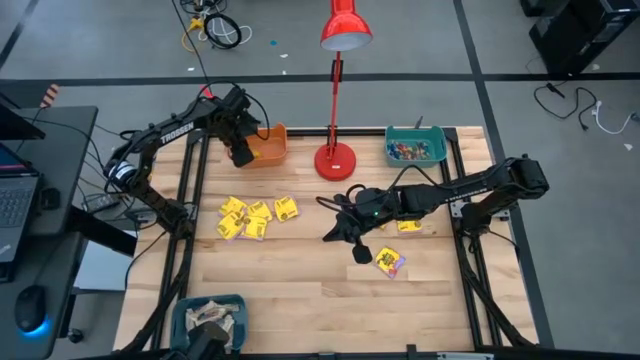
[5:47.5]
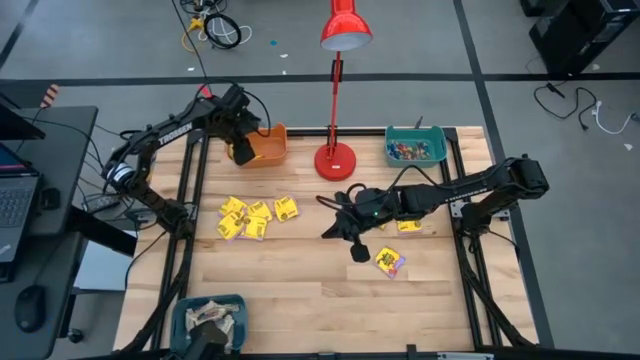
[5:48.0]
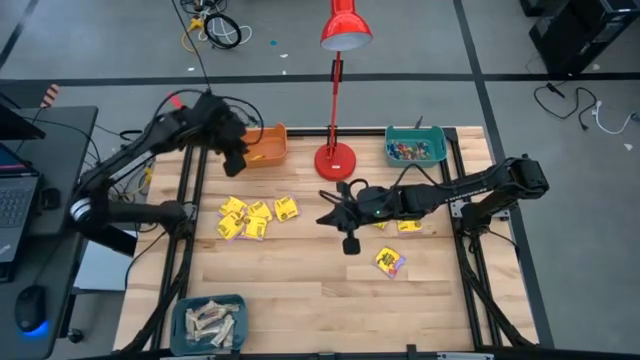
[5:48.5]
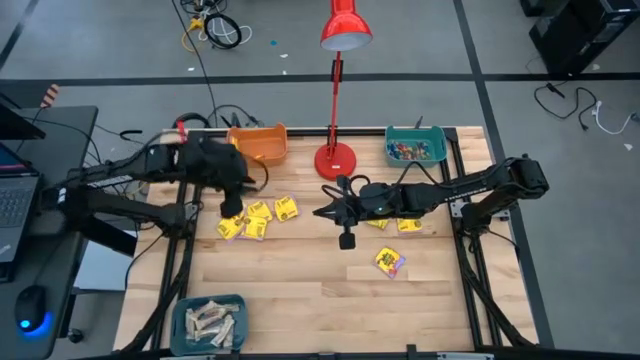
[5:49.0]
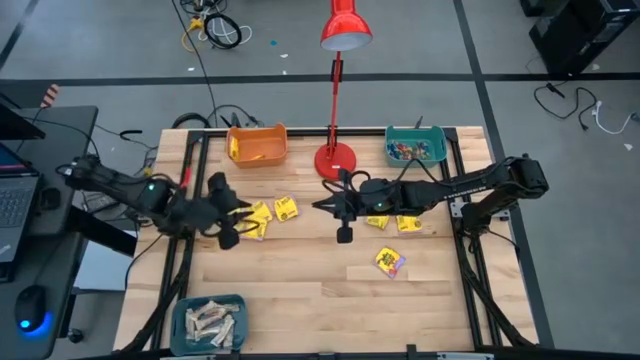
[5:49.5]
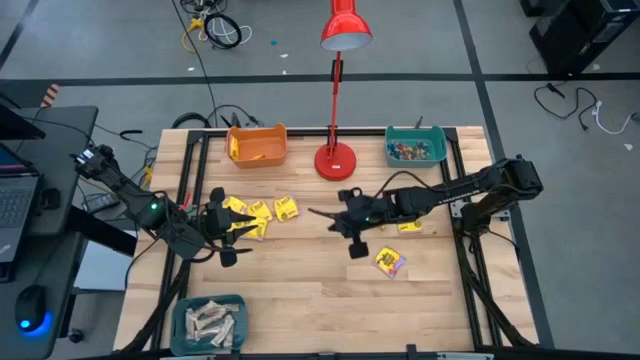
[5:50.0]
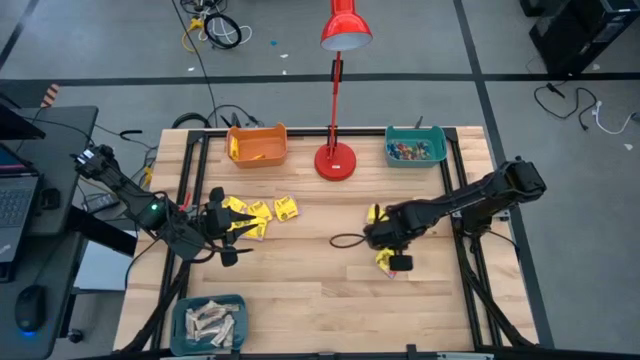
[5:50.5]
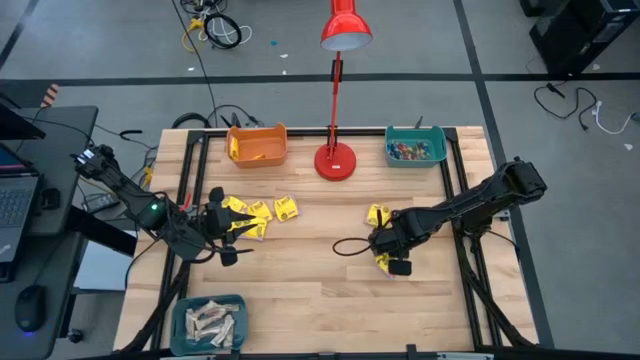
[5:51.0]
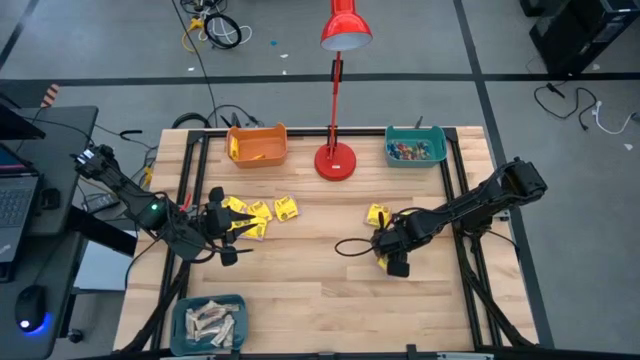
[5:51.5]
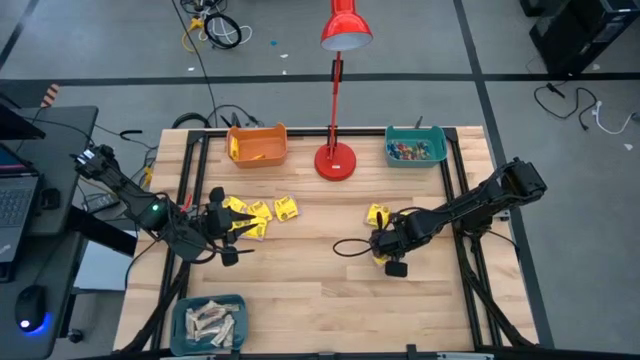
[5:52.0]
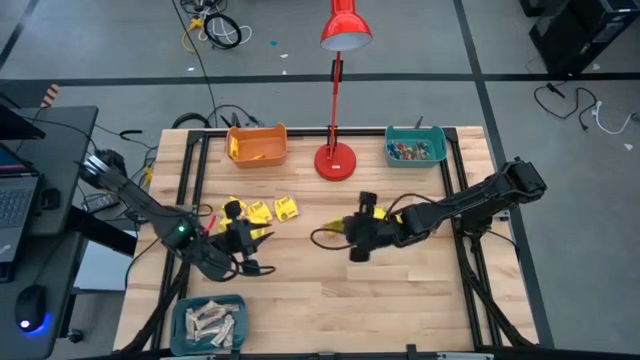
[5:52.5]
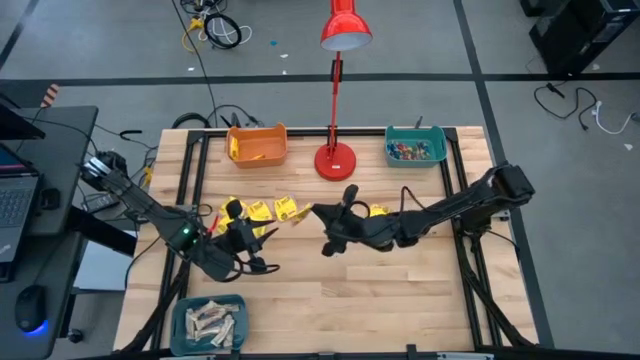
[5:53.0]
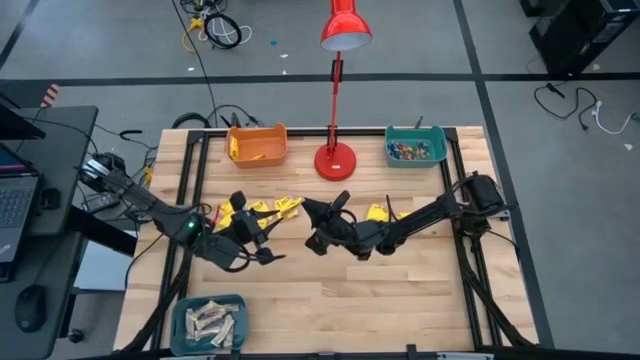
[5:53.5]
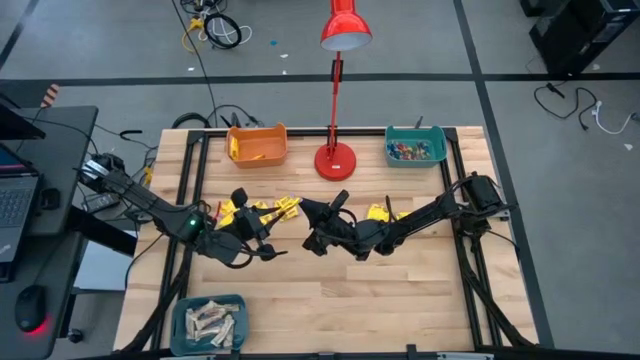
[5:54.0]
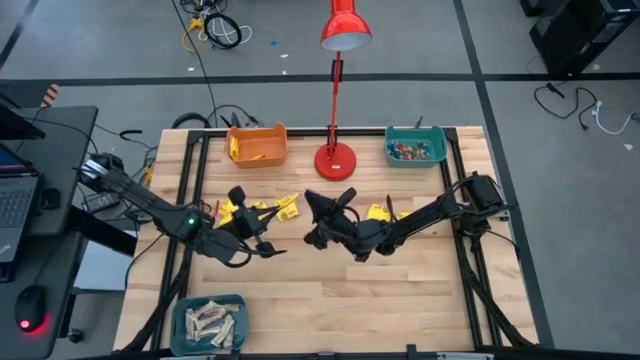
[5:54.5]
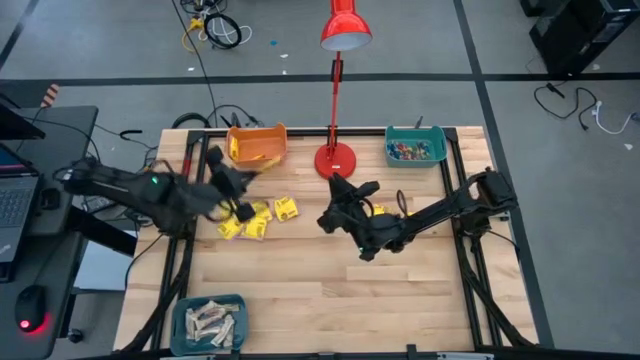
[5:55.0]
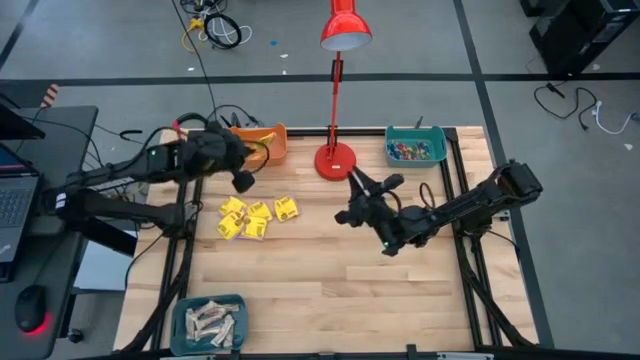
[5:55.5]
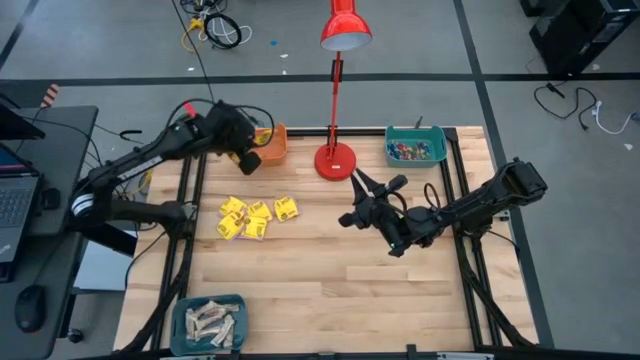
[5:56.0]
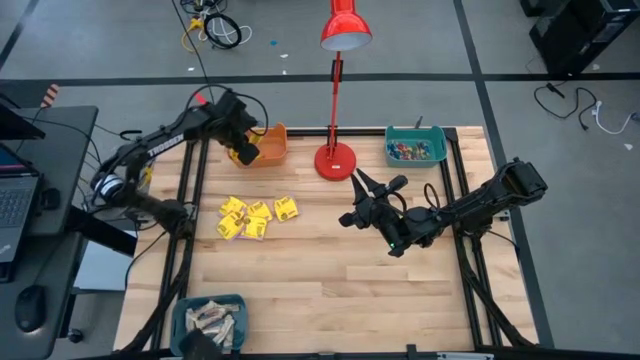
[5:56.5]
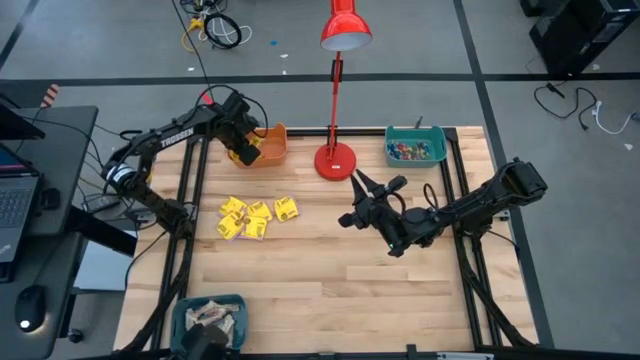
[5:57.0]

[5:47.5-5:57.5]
Task: Sort candy
Put the yellow candy into the orange bin

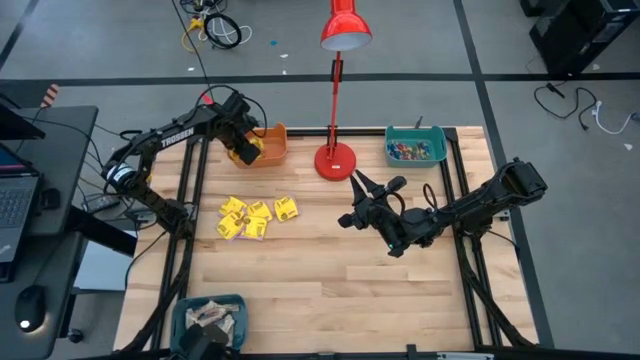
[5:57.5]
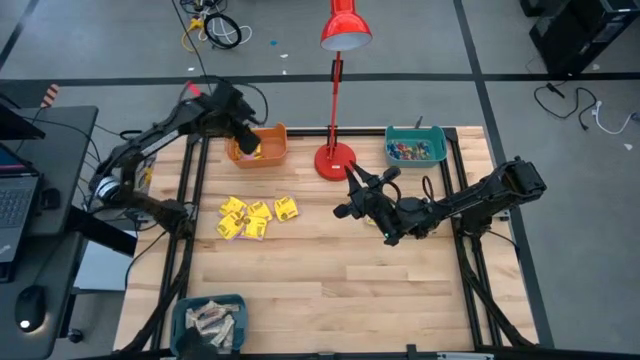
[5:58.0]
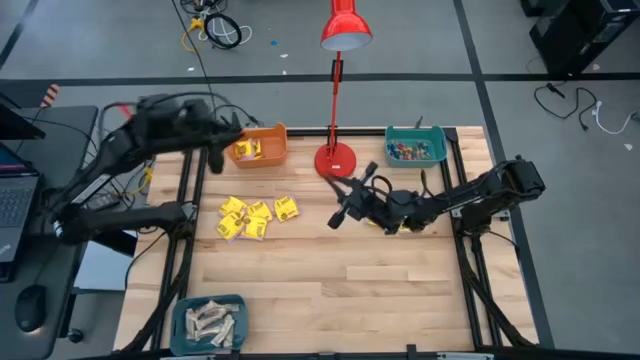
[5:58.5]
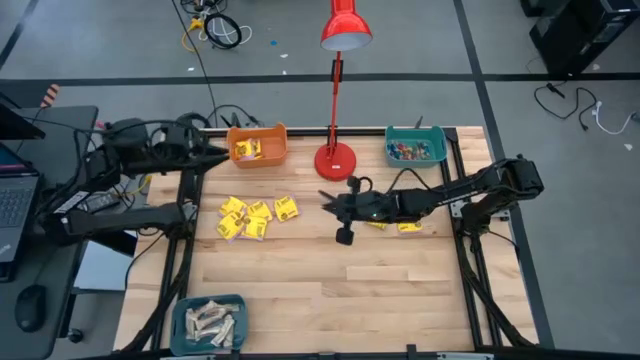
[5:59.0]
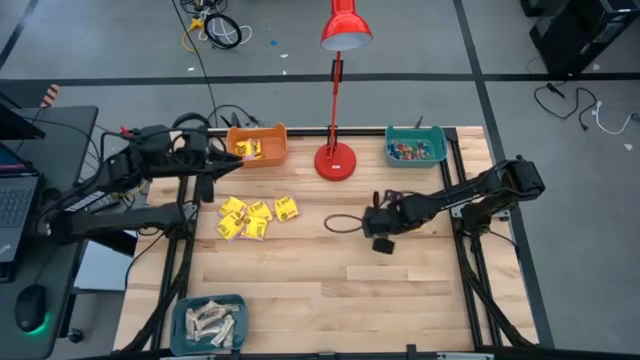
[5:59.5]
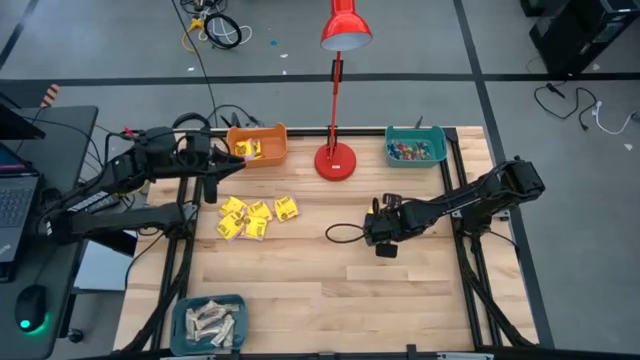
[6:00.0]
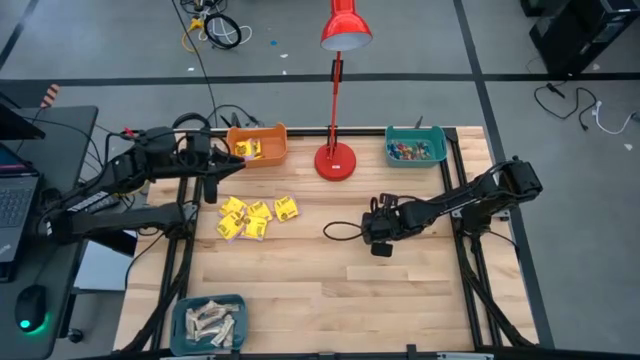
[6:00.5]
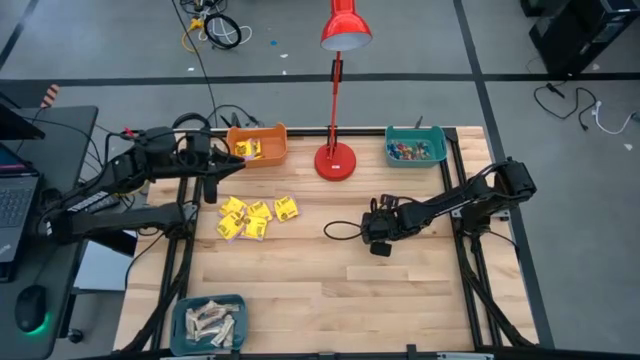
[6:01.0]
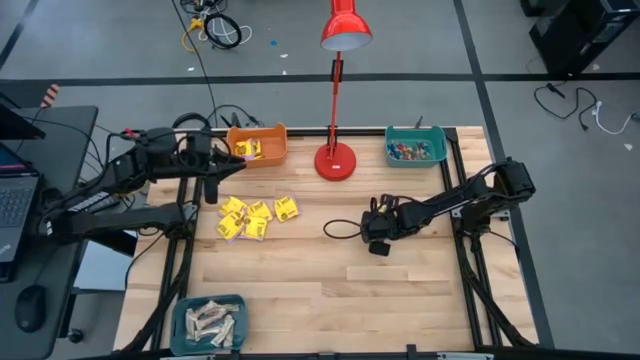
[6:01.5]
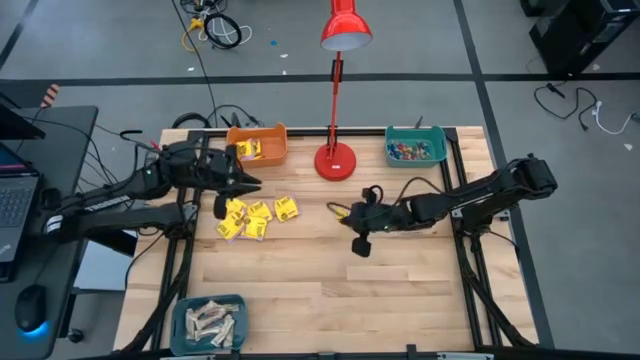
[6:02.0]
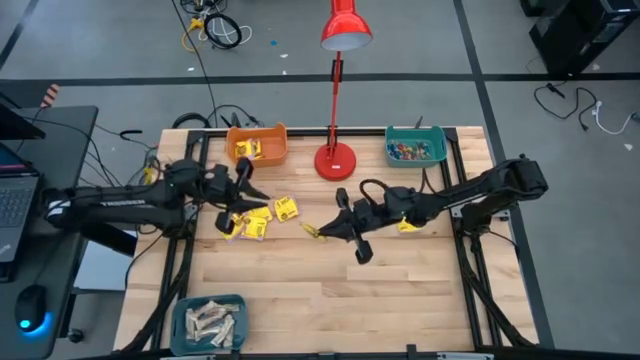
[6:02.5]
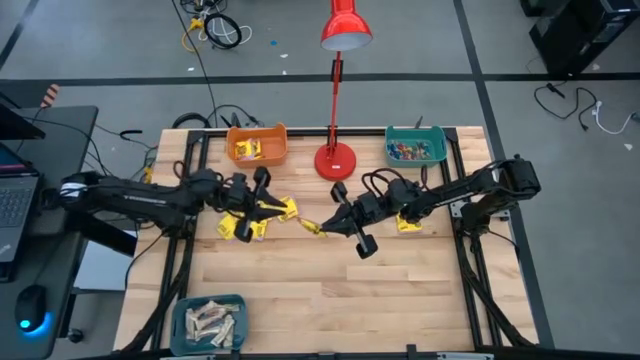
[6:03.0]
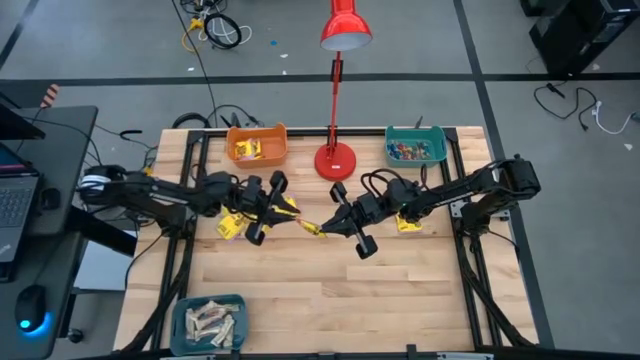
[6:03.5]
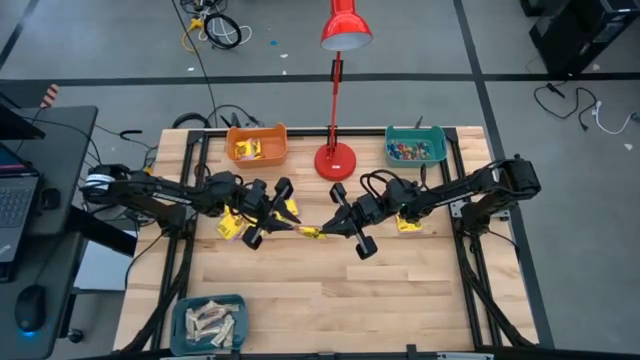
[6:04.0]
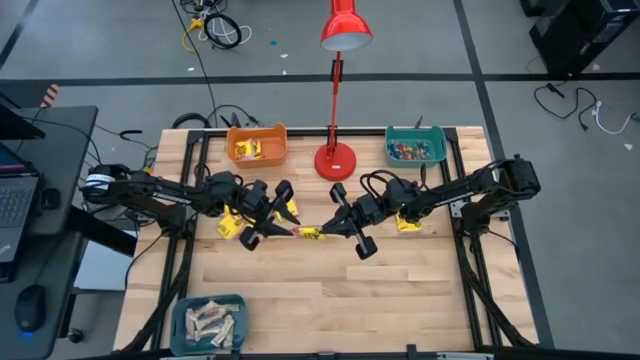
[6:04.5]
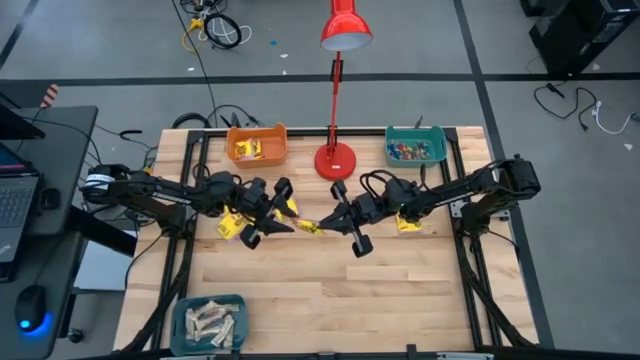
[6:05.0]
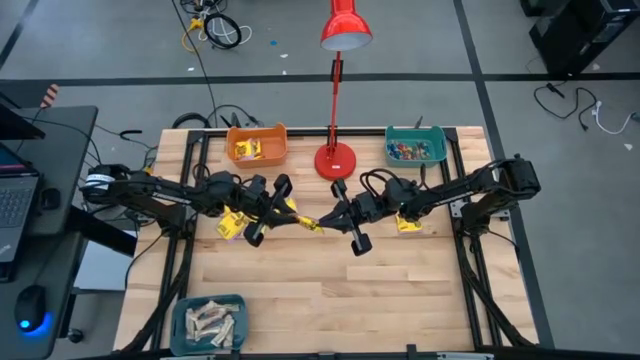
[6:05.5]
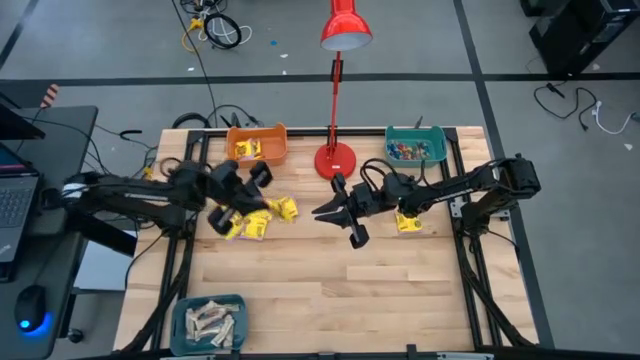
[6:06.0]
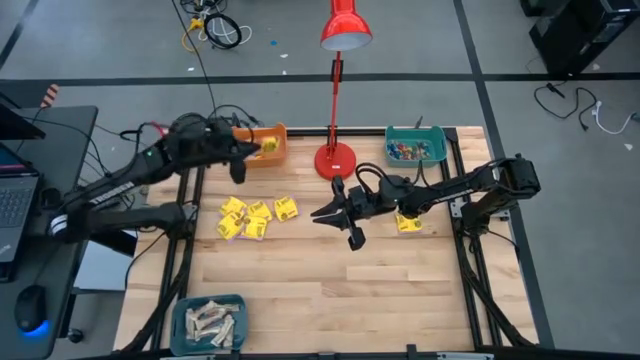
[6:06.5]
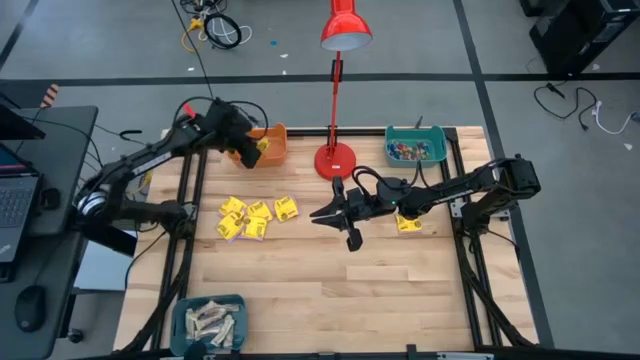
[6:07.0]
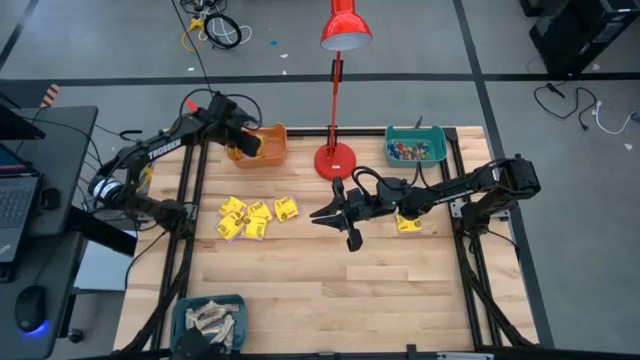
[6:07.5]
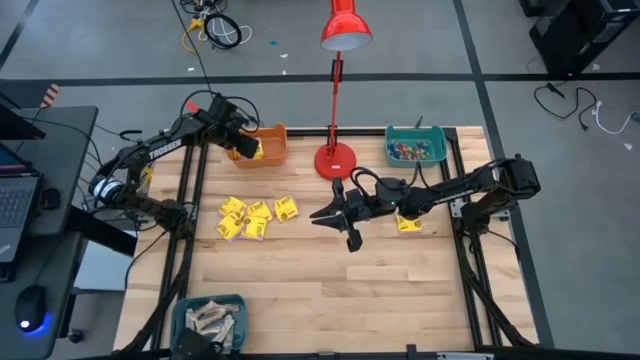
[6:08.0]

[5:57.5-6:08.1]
Put the yellow candy into the orange bin
